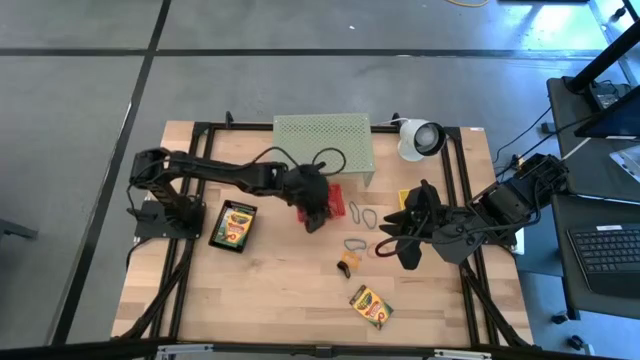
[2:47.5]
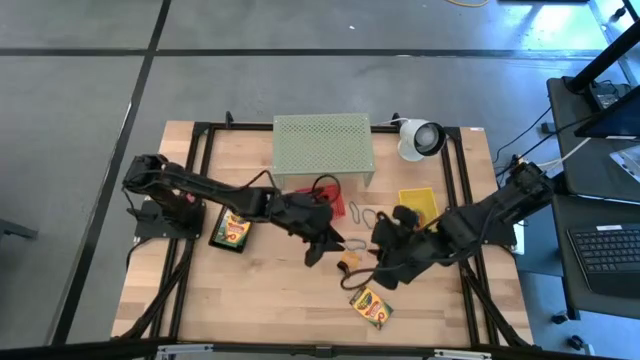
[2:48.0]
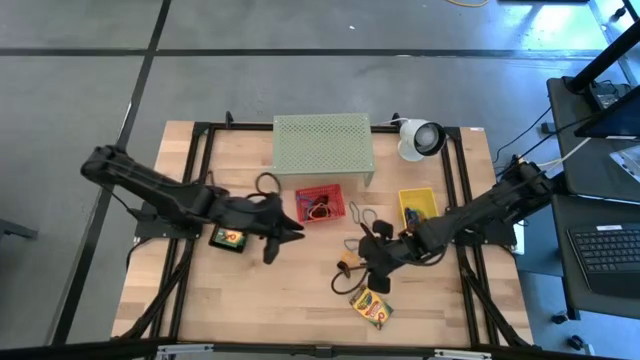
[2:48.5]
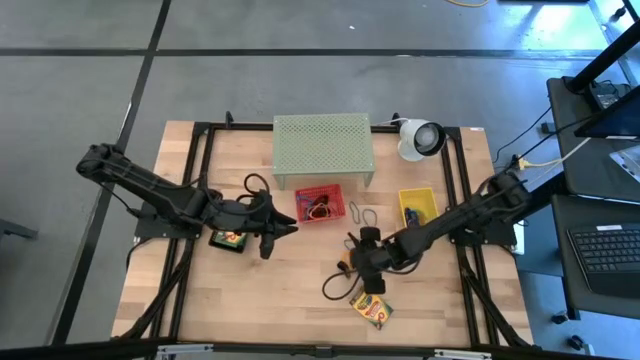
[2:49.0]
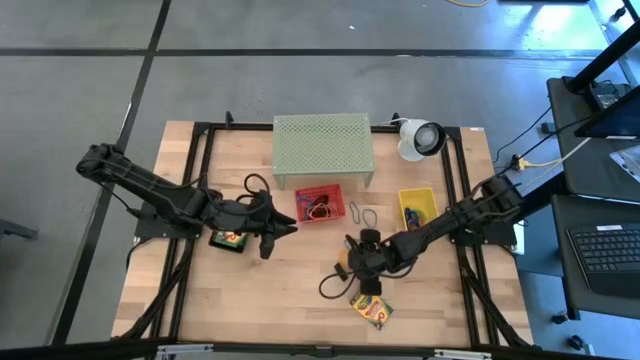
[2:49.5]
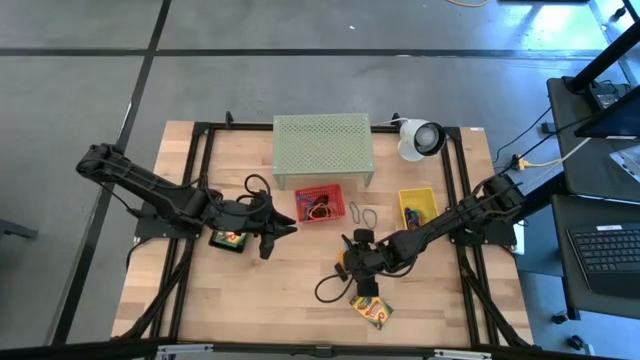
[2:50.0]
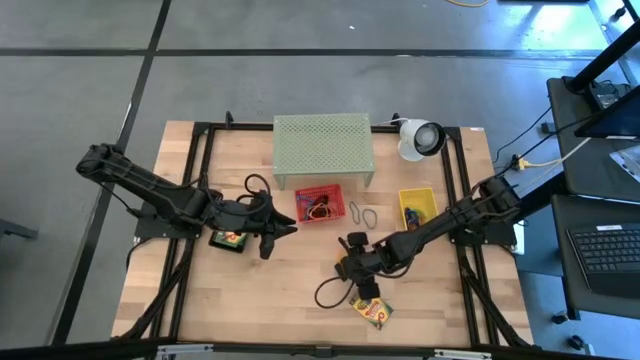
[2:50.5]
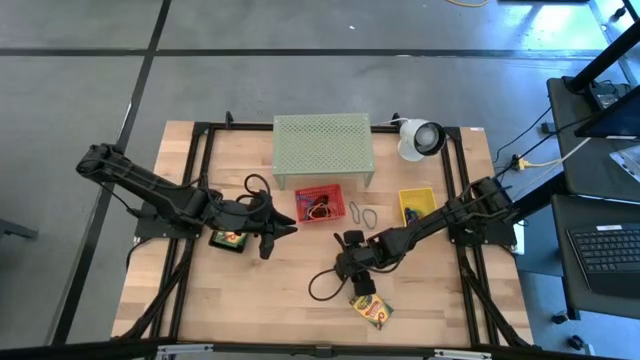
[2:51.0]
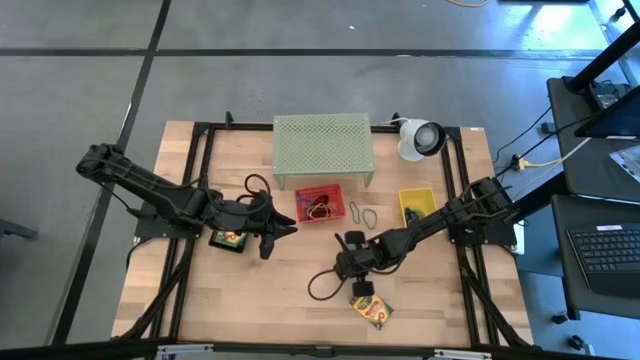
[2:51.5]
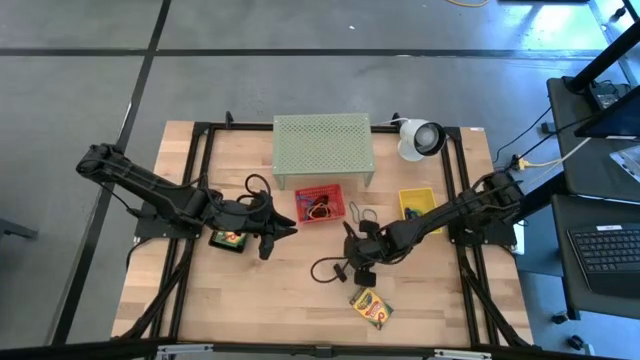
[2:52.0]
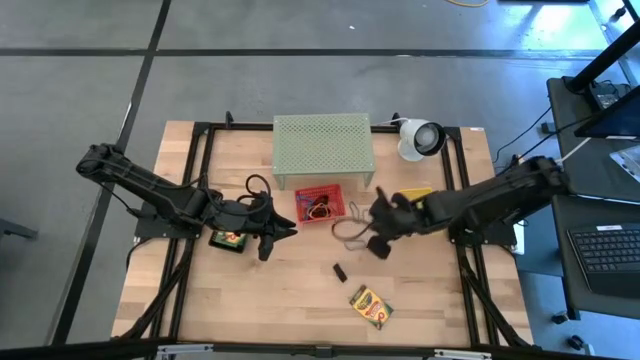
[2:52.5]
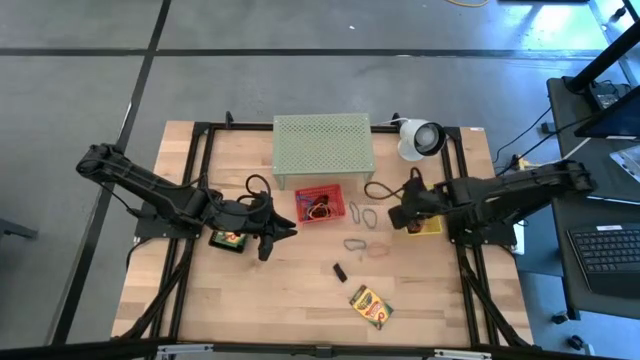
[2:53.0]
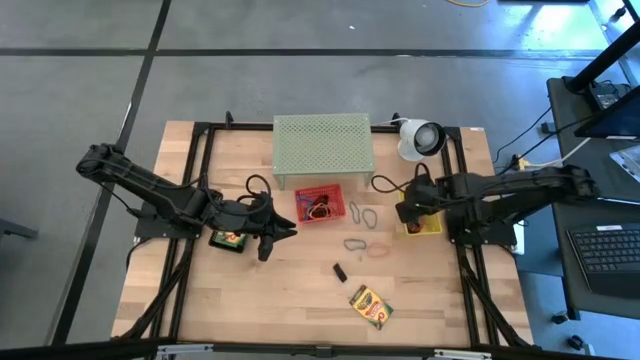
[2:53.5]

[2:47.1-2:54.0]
Task: Pick & Place Office Desk Supplies
Put the yellow spring keychain into the yellow bin

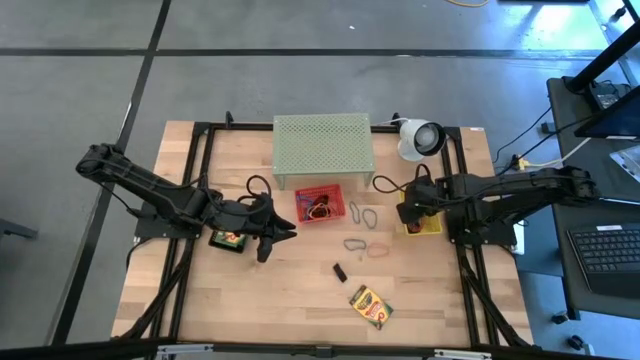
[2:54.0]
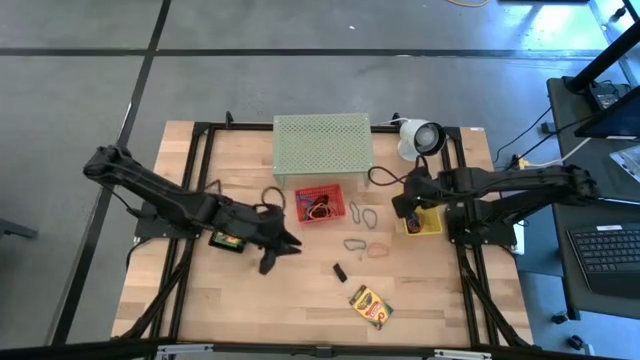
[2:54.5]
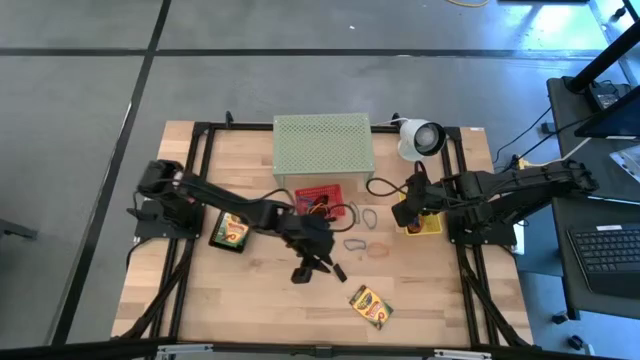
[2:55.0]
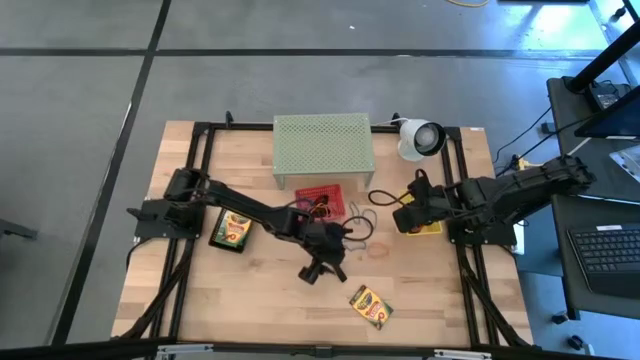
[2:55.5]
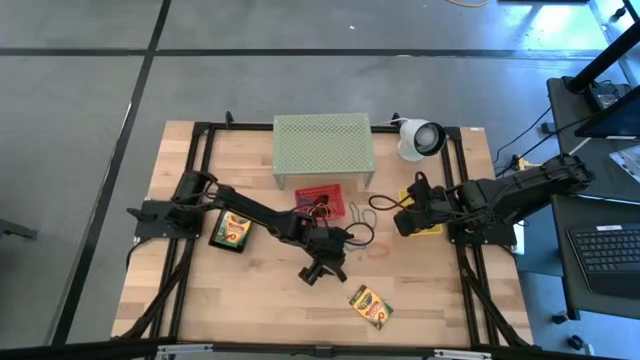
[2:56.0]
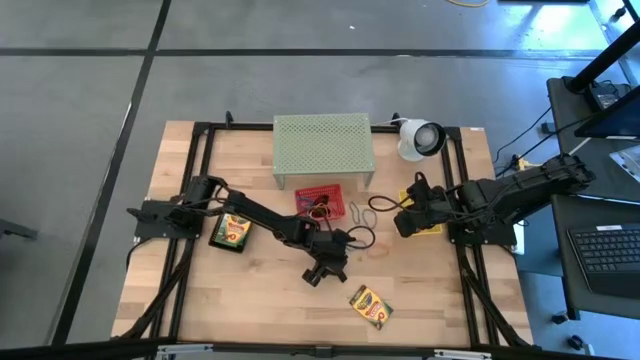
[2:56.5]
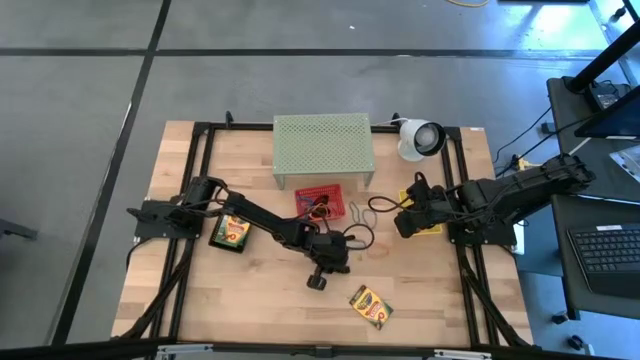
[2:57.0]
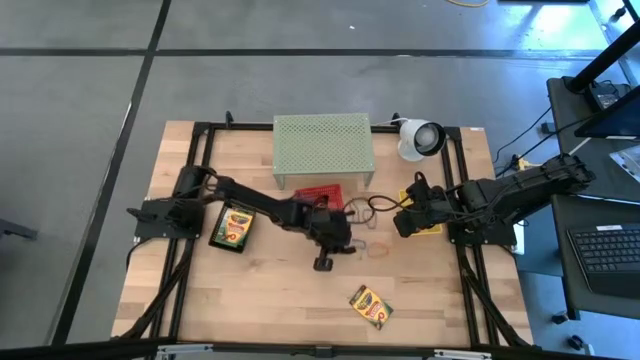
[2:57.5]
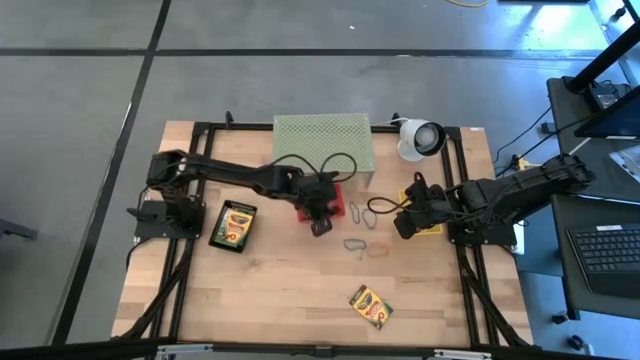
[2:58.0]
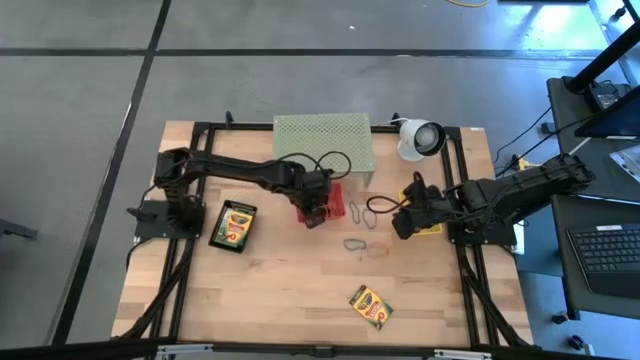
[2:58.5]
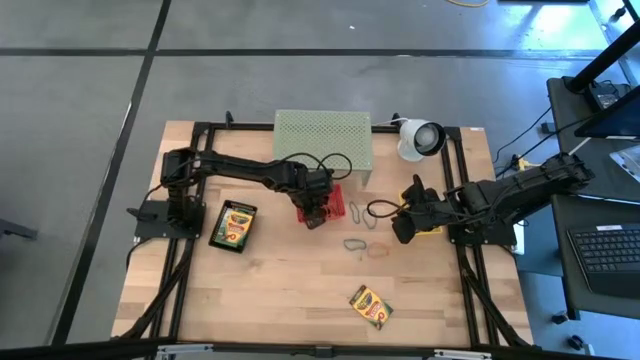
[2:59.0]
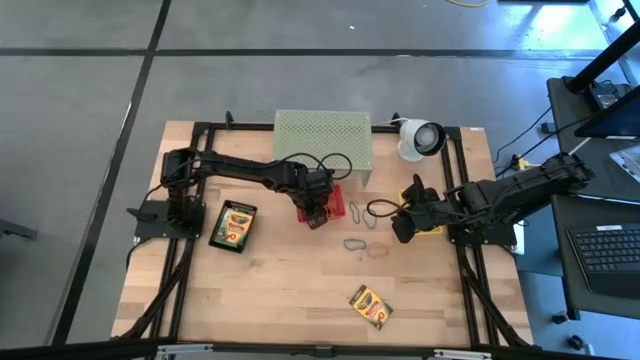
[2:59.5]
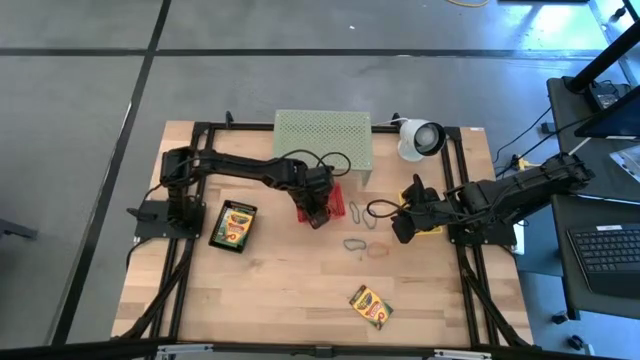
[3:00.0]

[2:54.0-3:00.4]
Put the black rubber band into the red bin

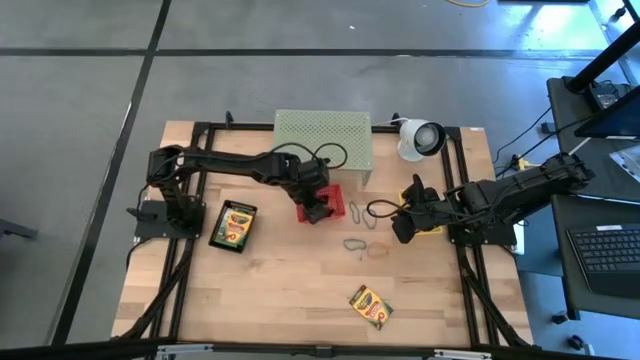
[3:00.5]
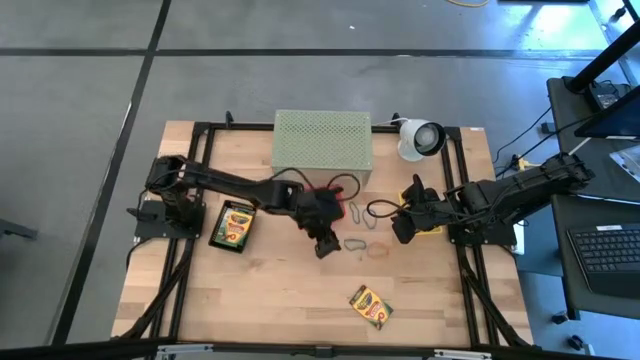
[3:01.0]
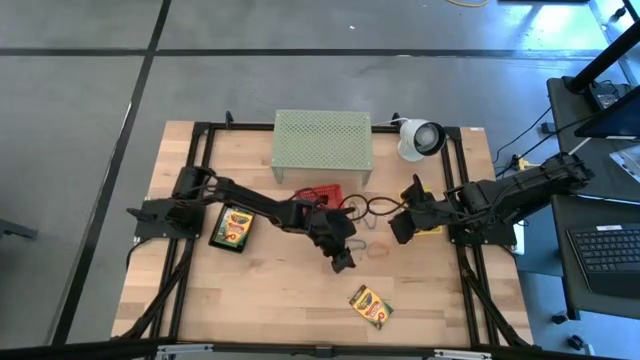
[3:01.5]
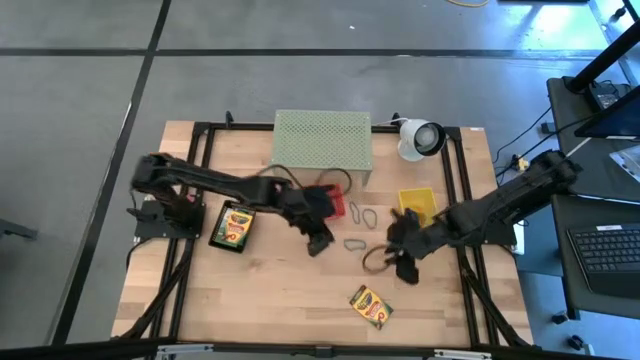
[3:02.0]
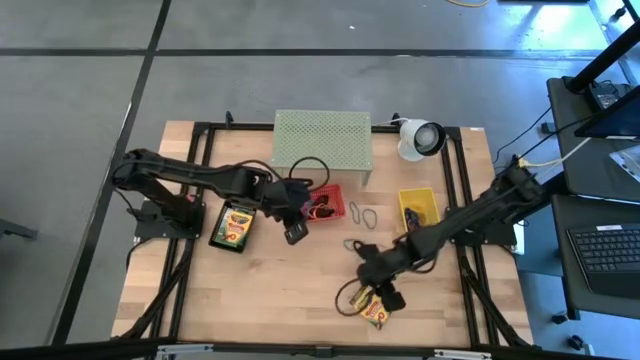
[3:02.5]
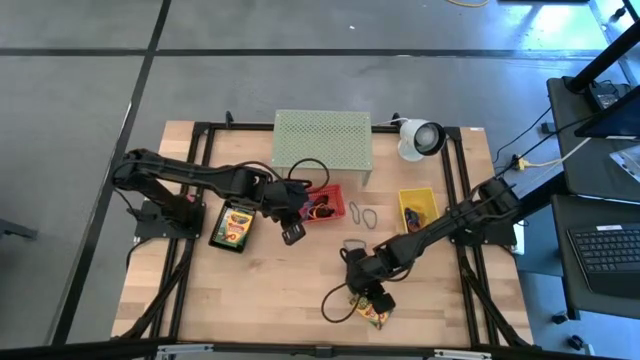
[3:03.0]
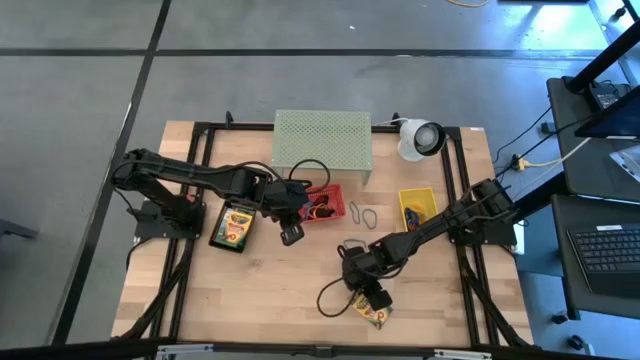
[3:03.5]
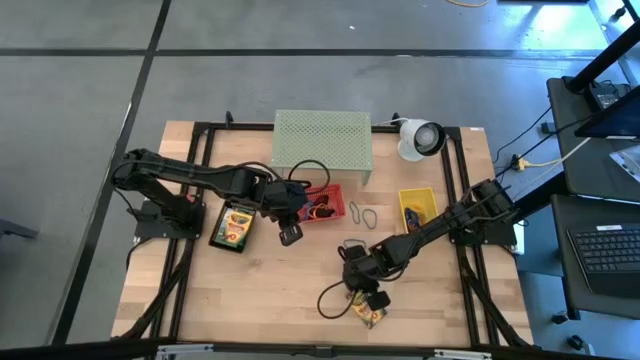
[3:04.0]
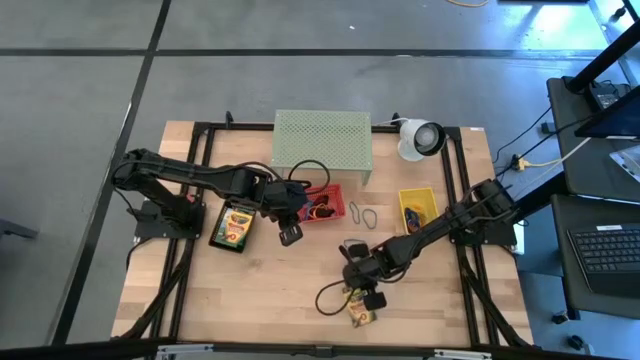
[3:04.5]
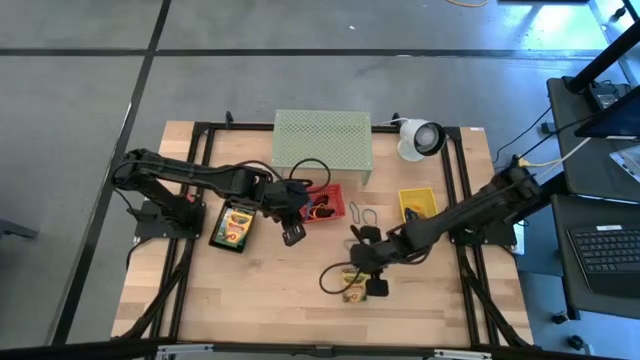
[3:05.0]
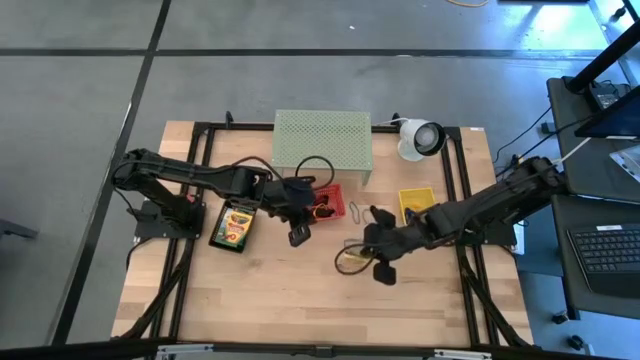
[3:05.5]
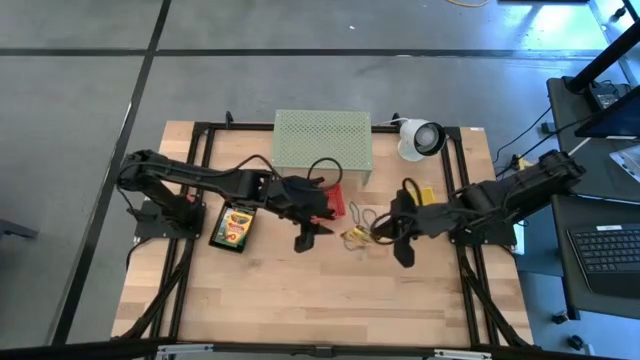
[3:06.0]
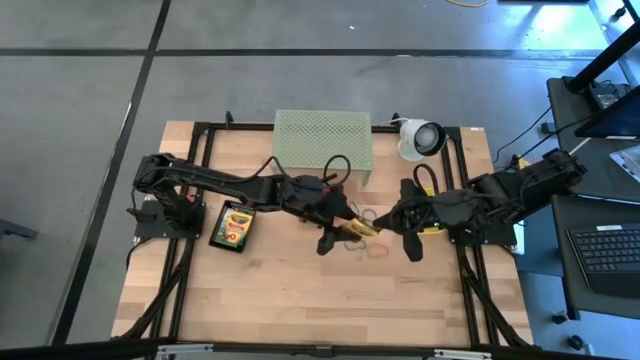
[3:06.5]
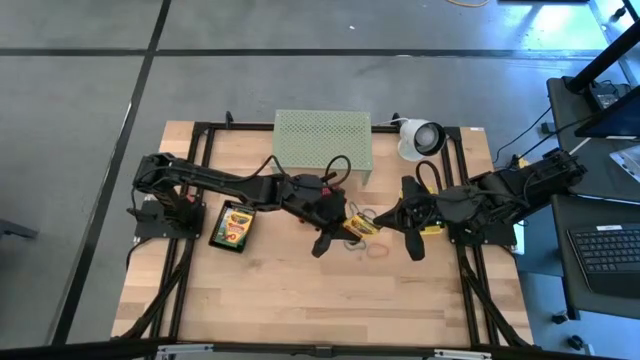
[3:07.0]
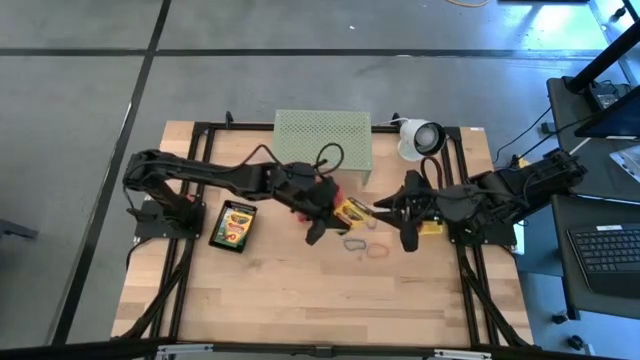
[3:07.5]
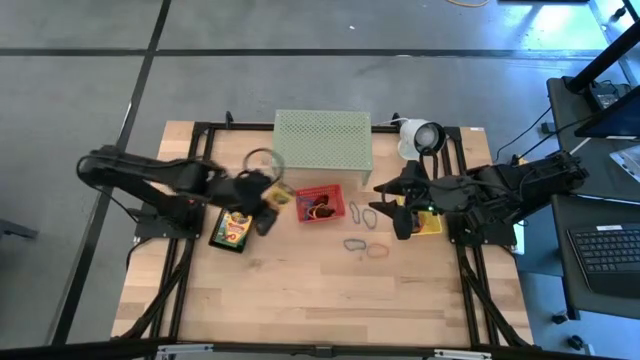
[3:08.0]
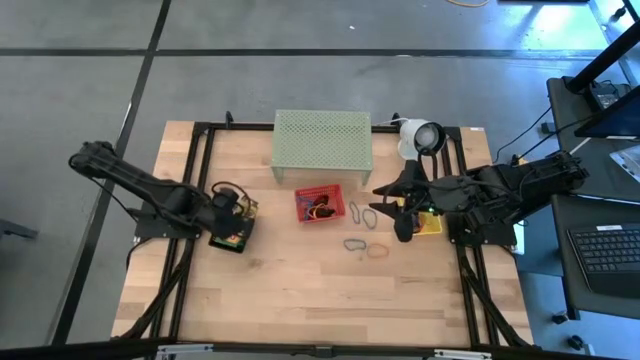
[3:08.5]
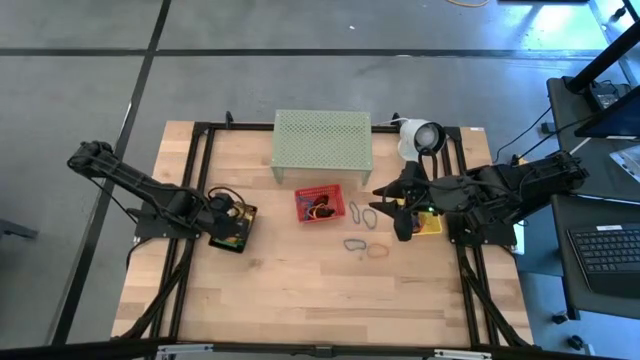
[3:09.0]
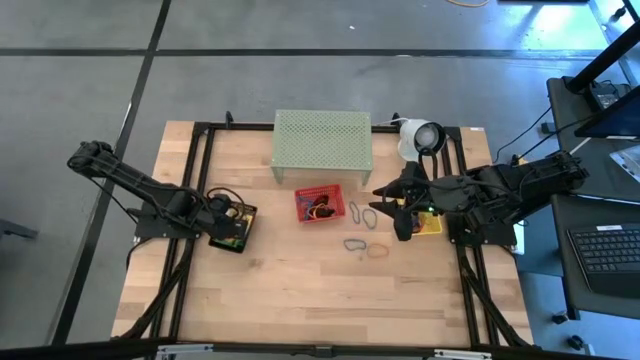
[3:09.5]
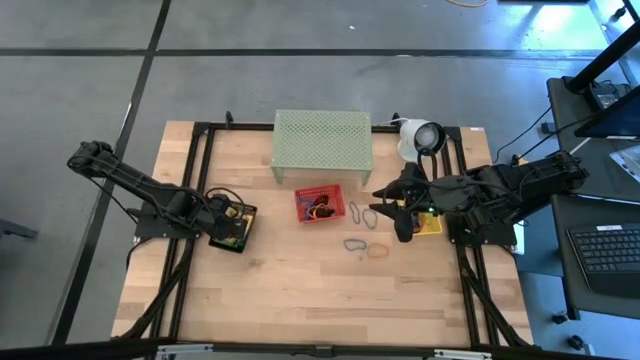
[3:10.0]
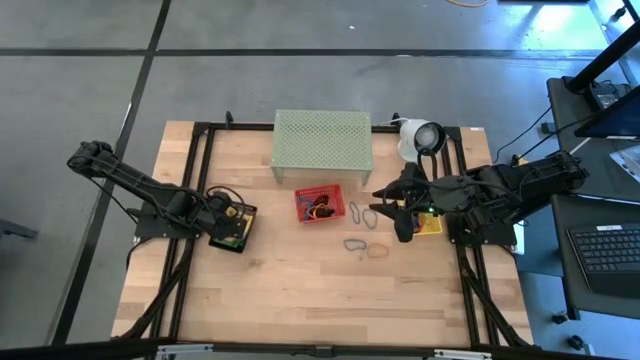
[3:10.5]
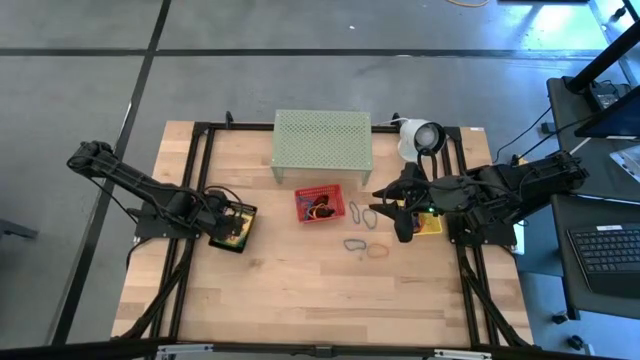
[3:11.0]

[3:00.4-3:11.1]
Put the yellow crayon box into the black bin
